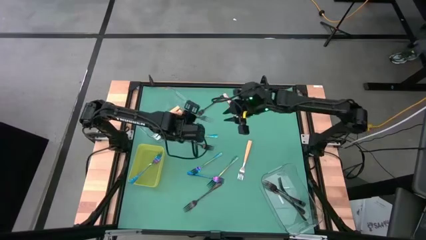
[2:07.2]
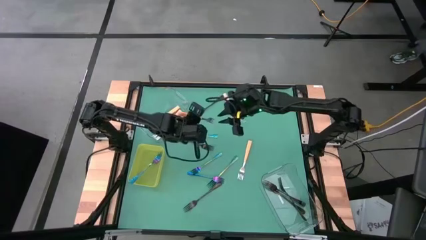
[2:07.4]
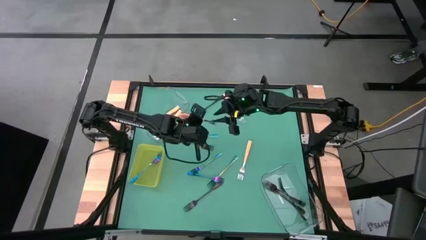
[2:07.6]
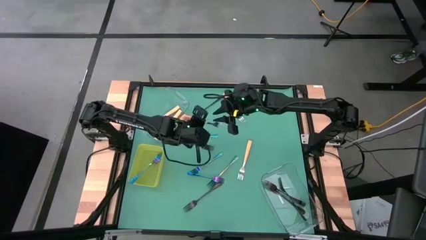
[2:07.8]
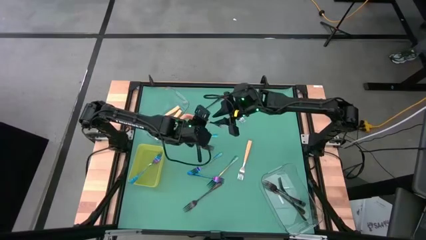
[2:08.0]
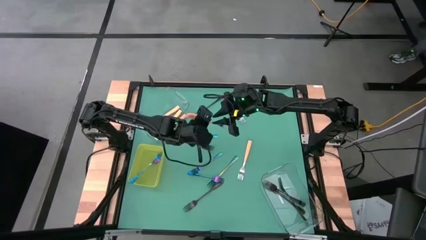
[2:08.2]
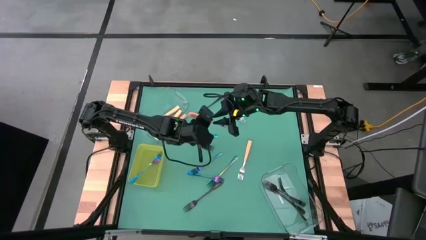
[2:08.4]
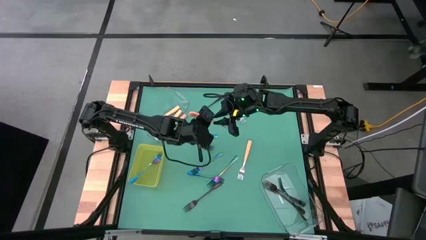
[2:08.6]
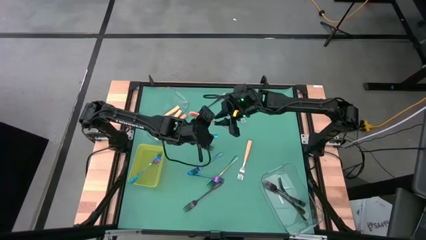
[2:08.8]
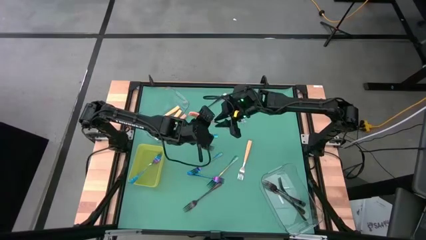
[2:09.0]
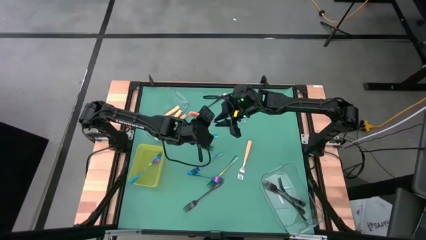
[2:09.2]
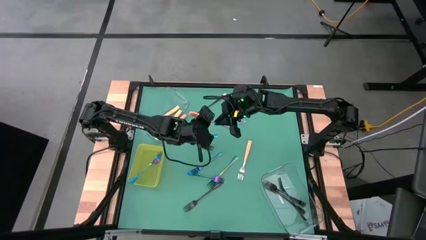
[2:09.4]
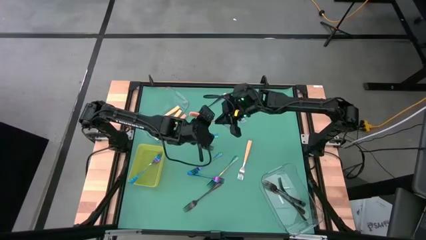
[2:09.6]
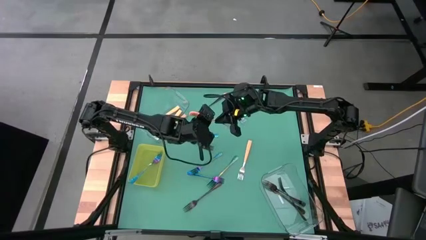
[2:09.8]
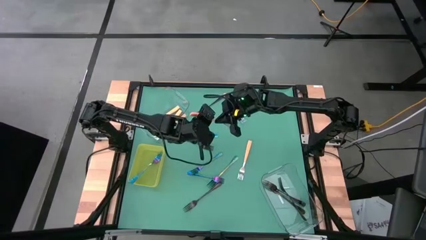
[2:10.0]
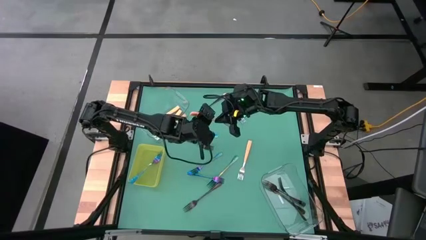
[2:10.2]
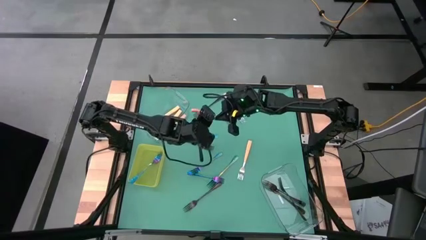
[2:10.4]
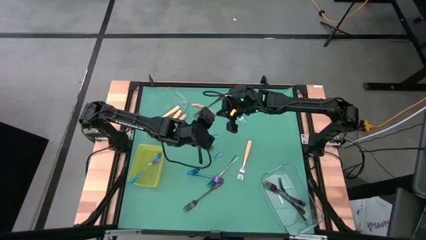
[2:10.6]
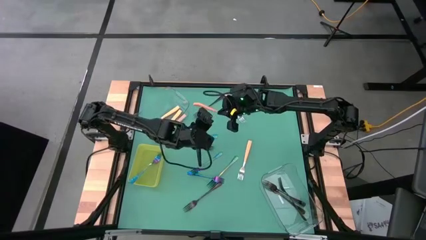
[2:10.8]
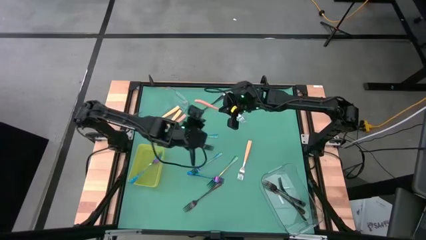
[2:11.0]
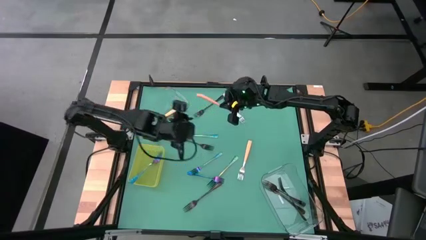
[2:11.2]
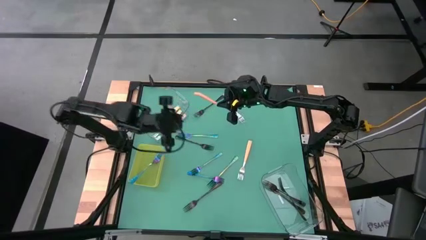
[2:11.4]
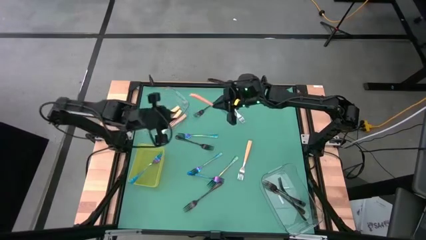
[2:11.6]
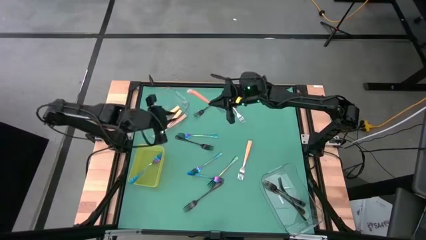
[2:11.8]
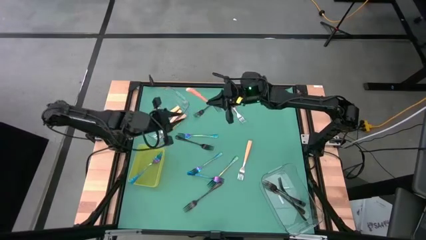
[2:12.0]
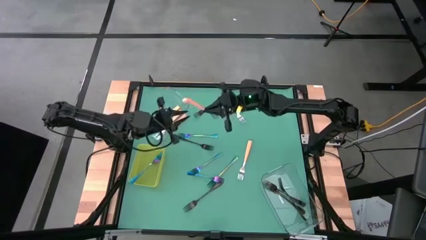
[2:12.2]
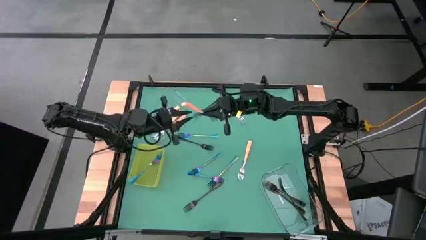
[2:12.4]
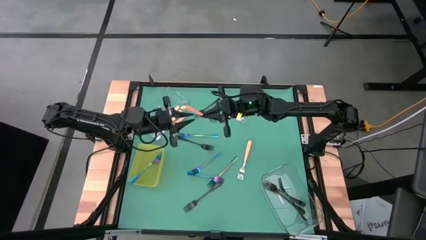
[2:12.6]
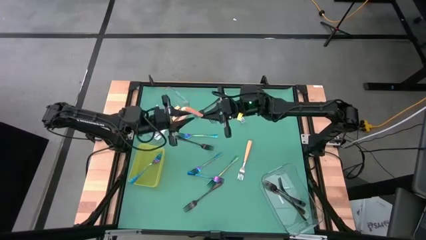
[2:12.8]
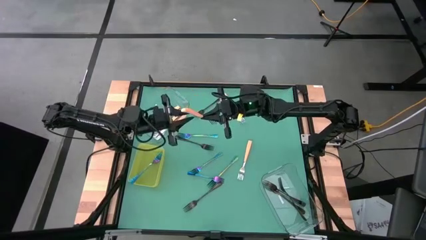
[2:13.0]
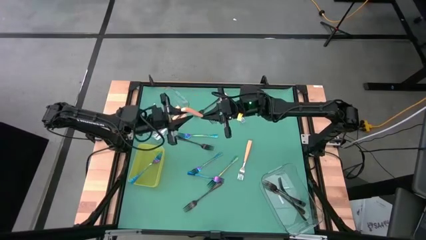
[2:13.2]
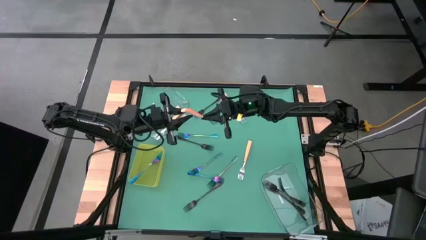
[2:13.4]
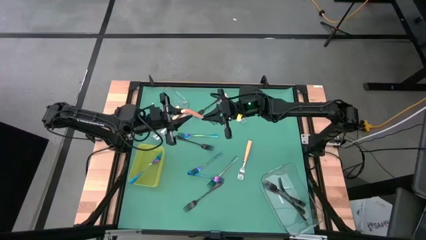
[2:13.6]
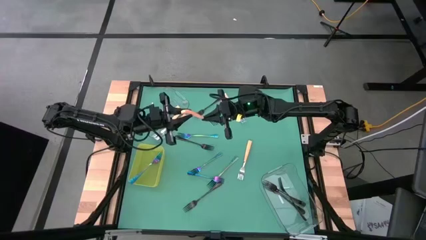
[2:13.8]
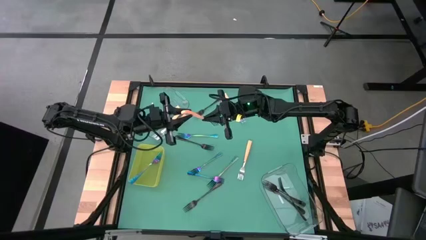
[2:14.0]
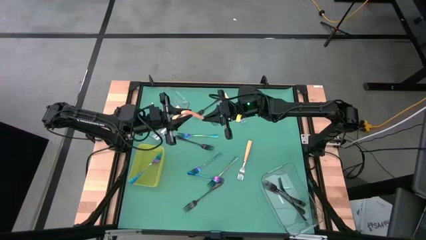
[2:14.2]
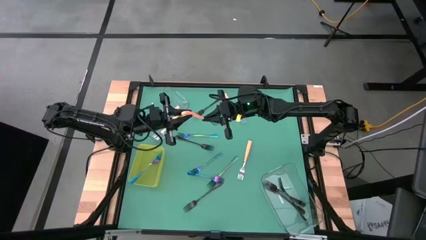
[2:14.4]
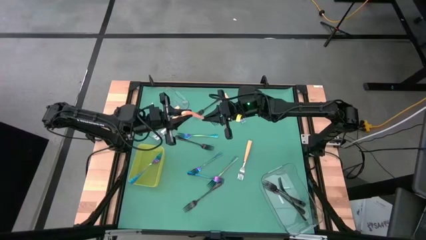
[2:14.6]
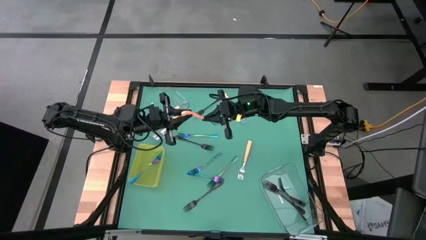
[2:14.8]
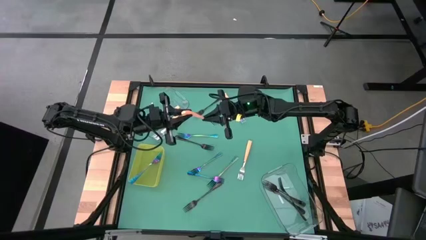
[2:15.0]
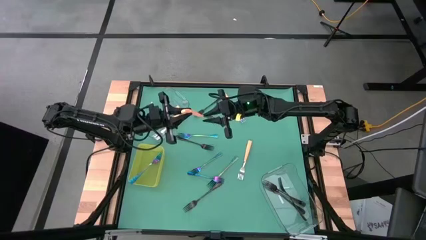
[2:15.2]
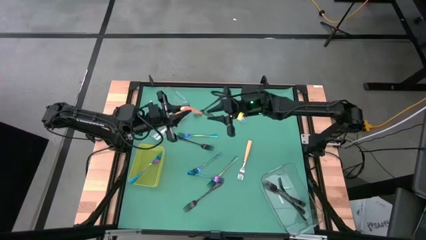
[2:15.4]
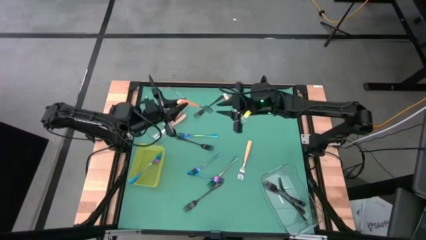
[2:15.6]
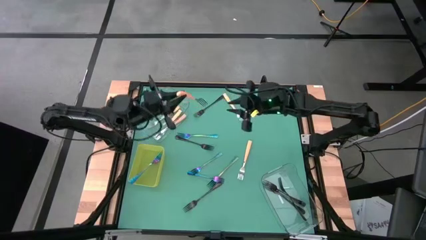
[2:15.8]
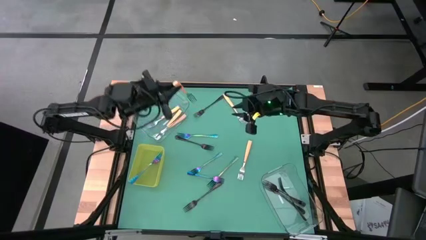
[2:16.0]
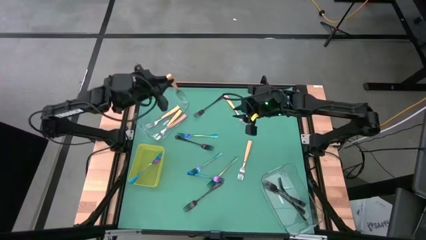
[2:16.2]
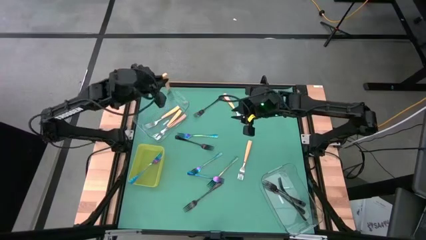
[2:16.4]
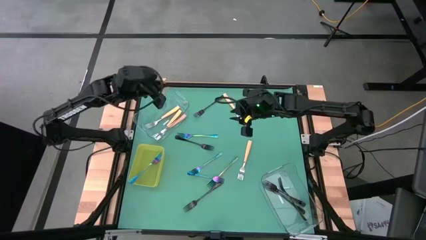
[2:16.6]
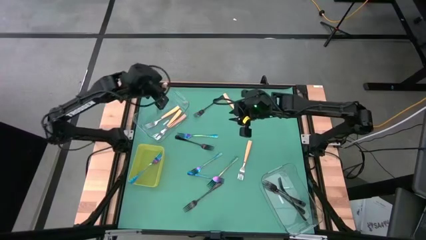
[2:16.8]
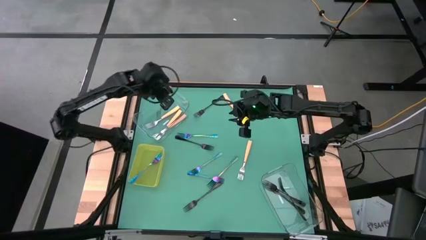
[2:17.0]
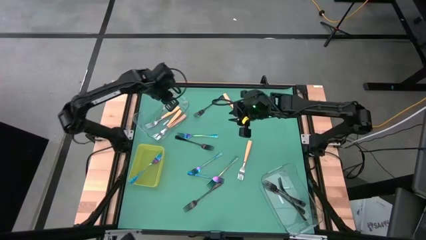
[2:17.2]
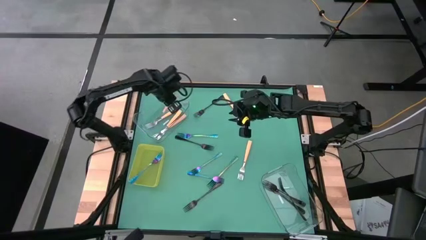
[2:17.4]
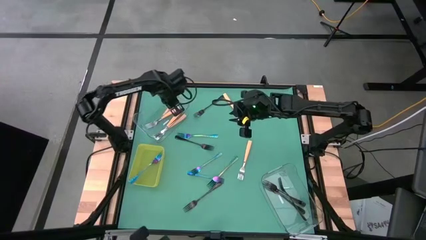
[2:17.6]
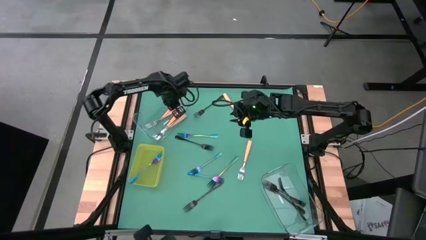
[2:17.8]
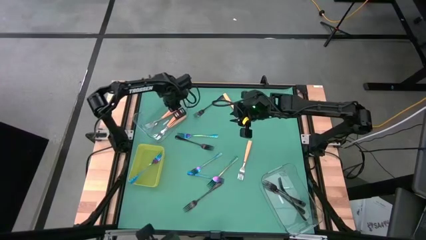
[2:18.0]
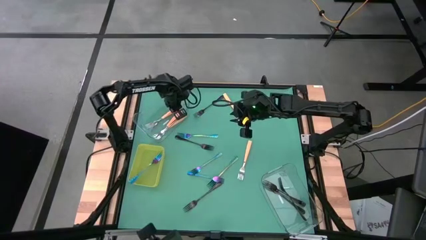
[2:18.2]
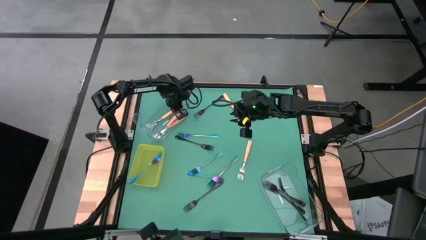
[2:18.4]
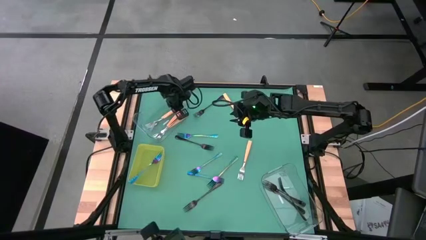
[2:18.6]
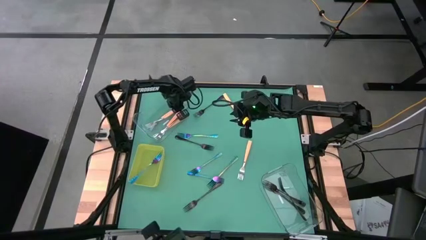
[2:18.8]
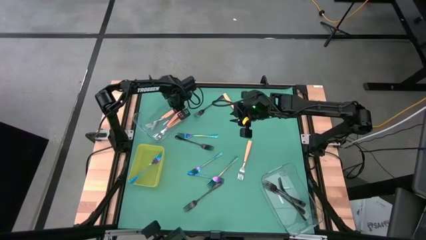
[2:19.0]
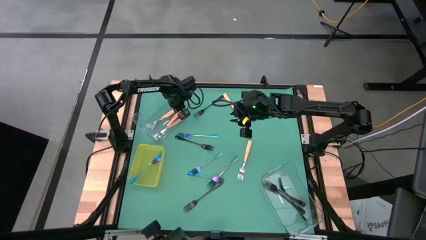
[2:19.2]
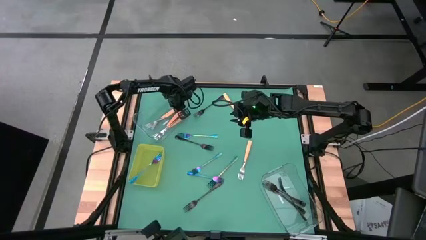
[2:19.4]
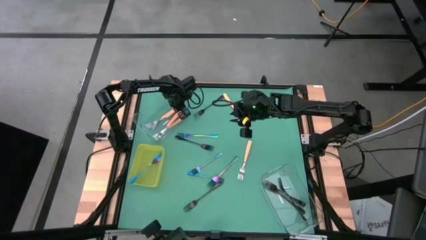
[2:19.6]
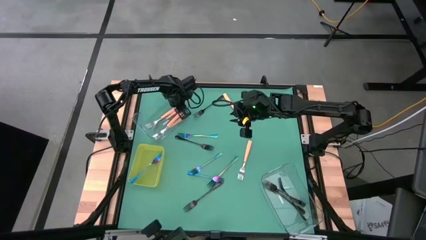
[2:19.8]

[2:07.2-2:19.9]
Task: Sort silverware by color (type)
Put the orange fork in the top transparent bin
